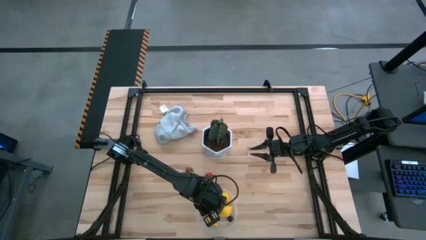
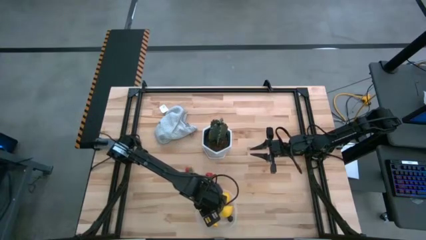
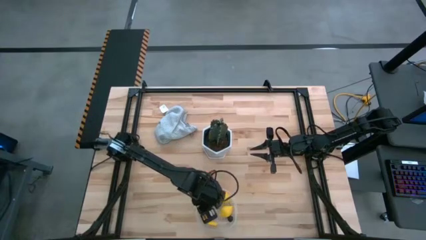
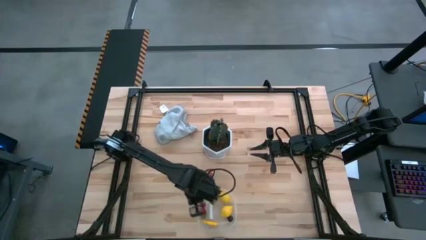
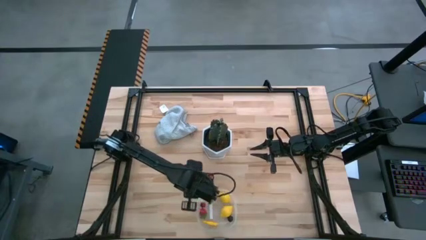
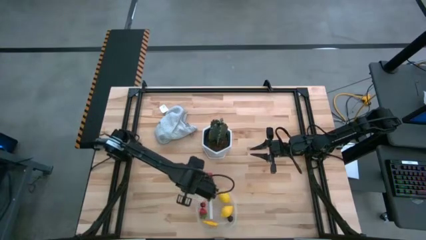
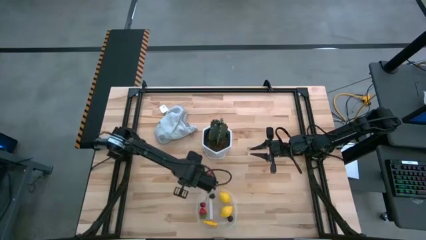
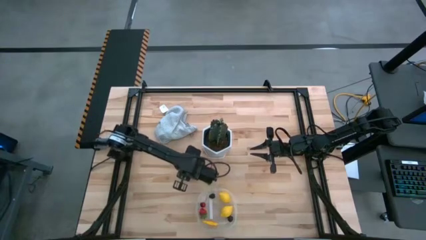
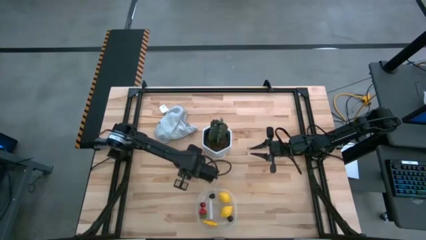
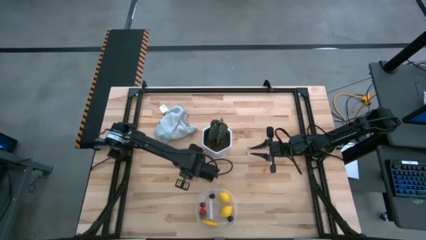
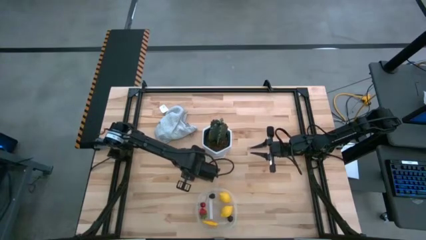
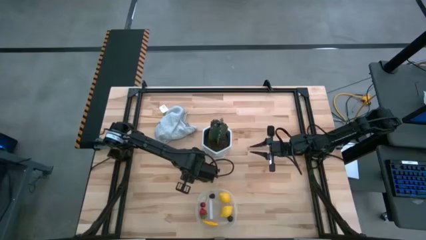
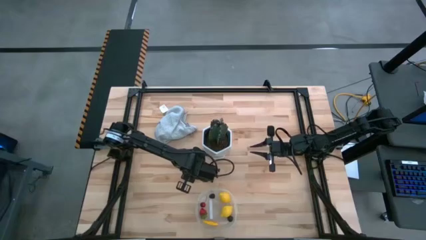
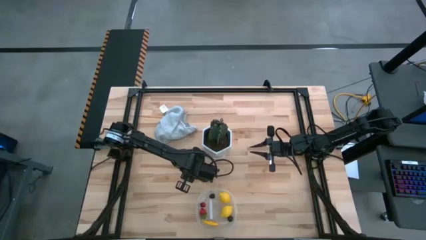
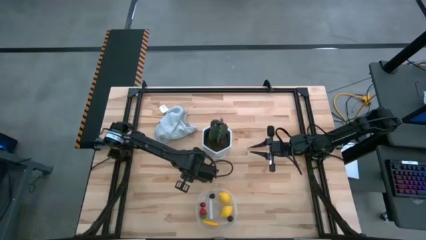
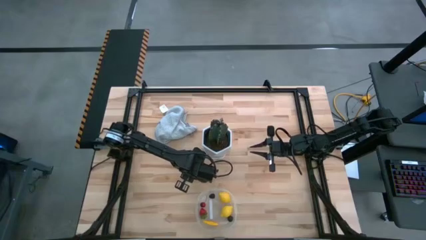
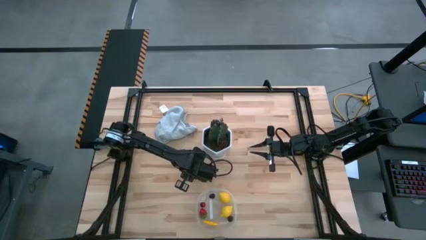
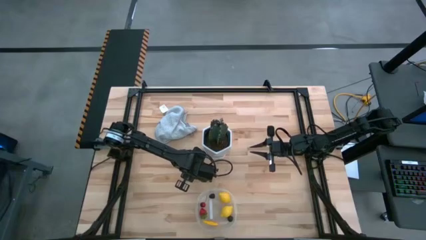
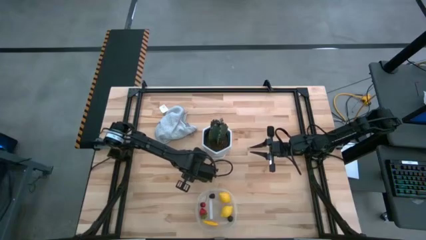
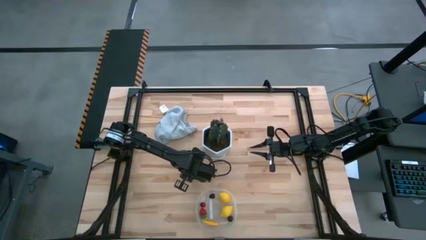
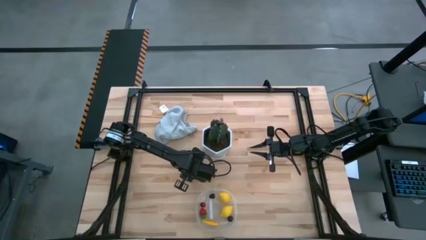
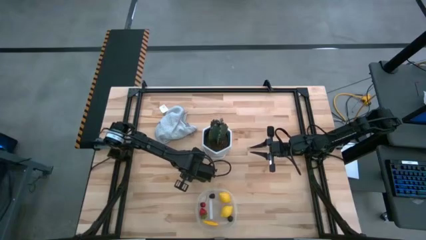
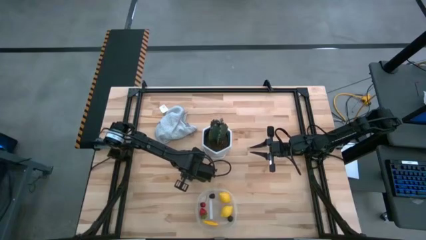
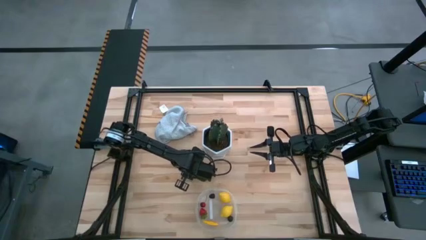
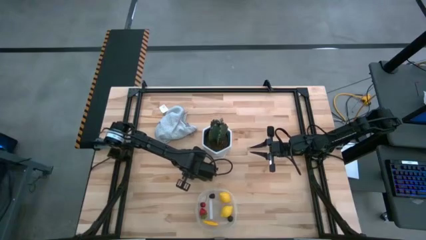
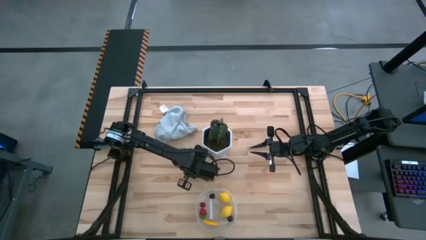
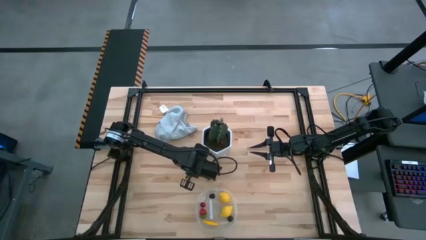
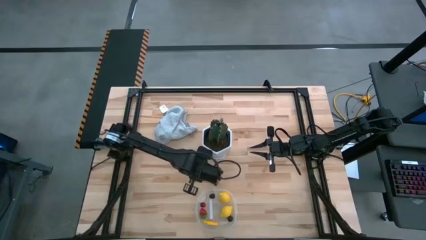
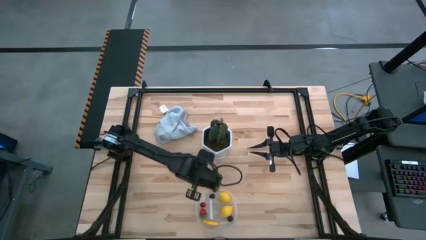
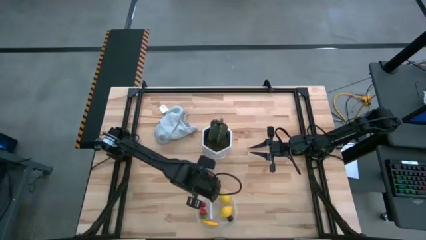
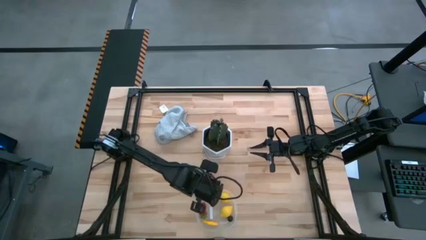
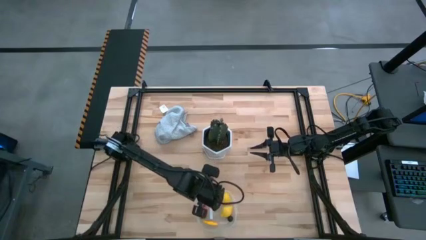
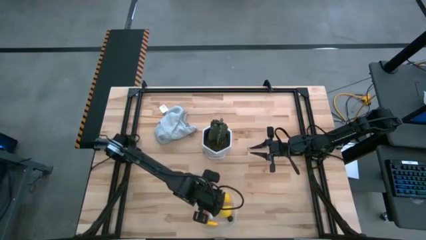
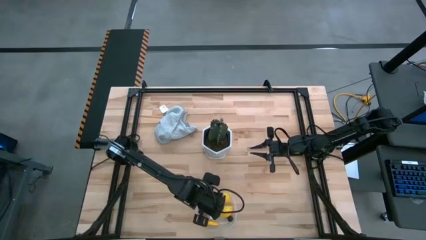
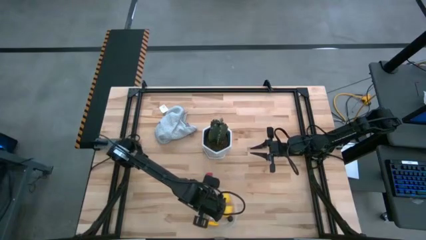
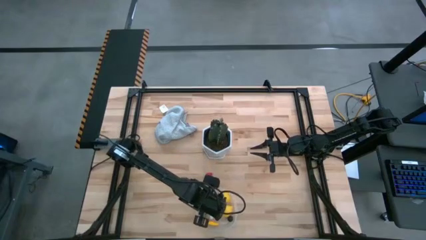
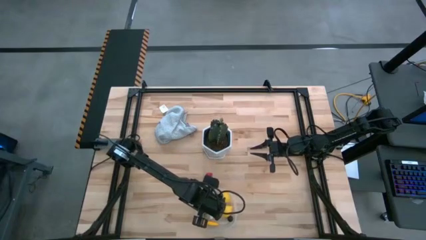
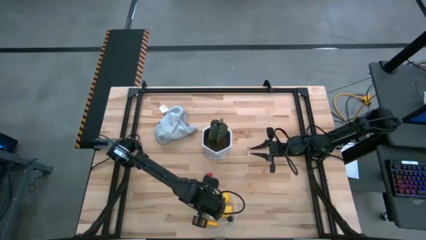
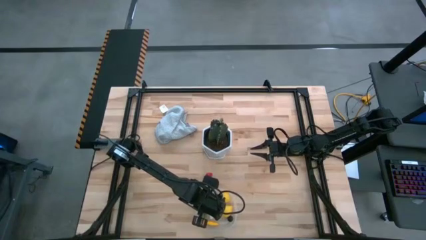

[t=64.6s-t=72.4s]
Task: Pick and placing Produce into tupperware
Put the left red strawberry into the transparent bin

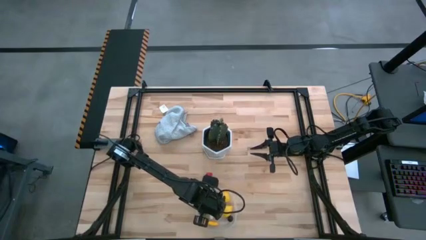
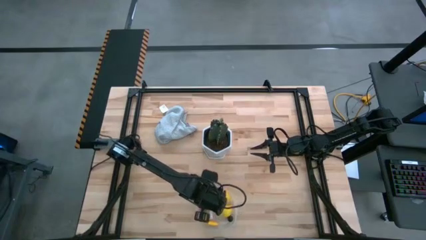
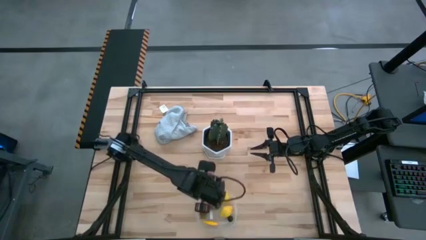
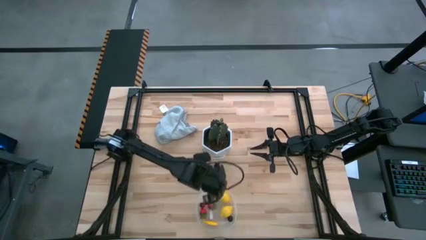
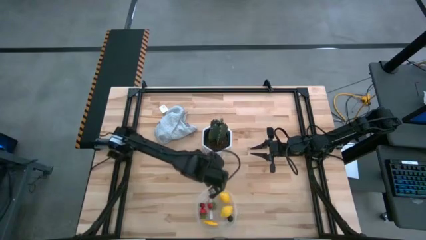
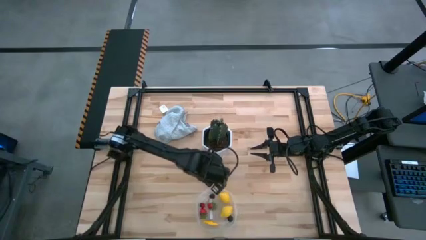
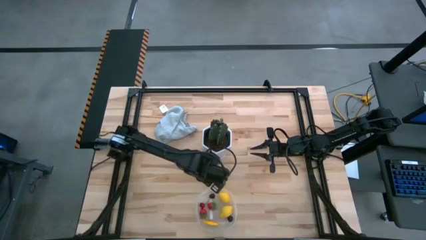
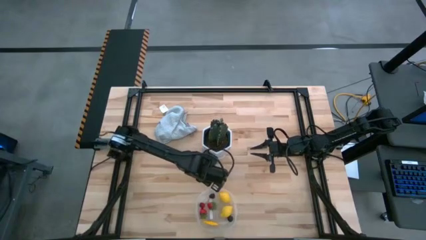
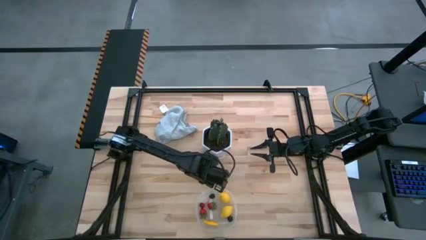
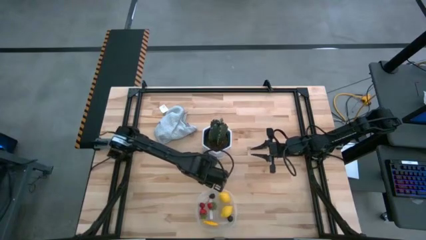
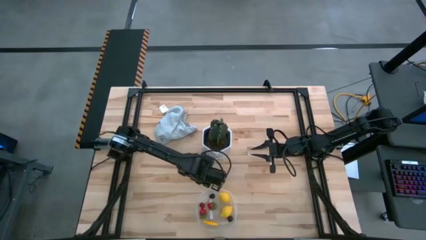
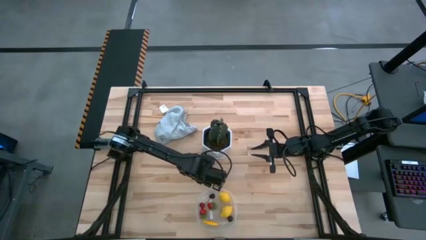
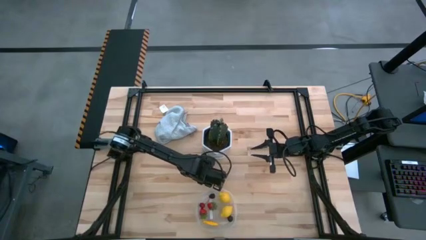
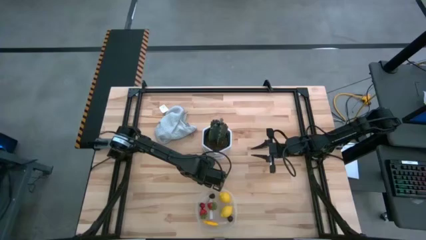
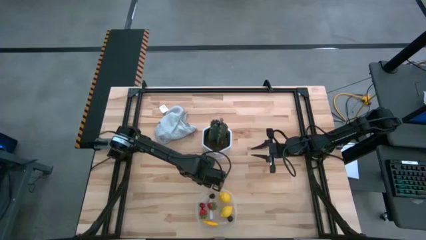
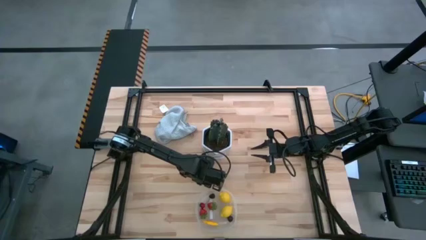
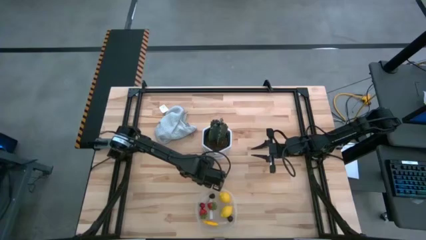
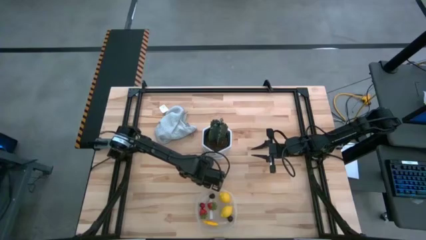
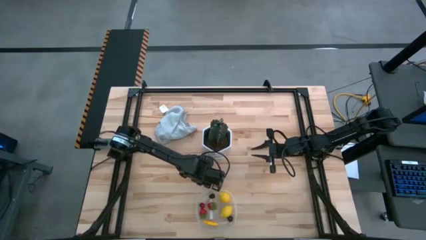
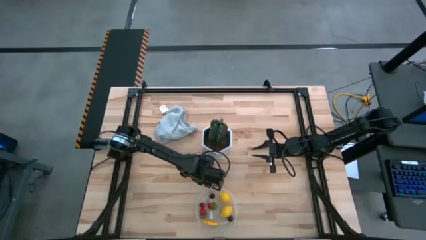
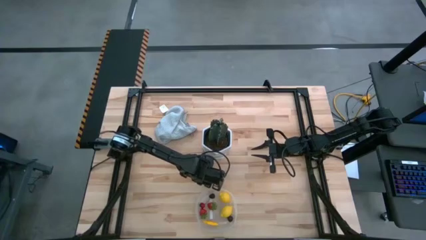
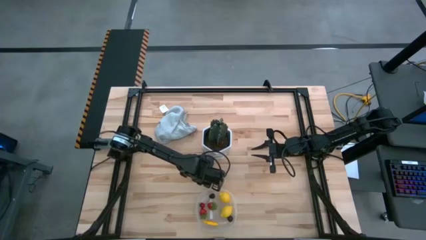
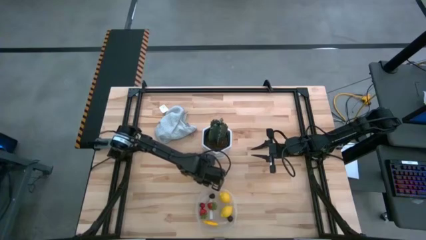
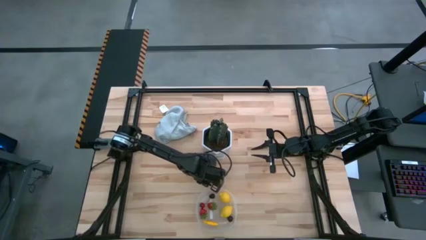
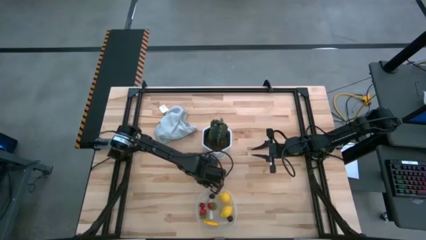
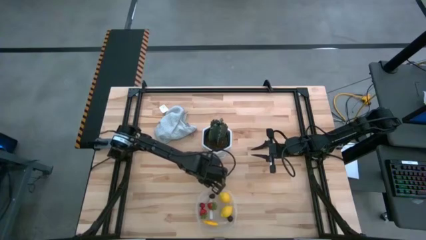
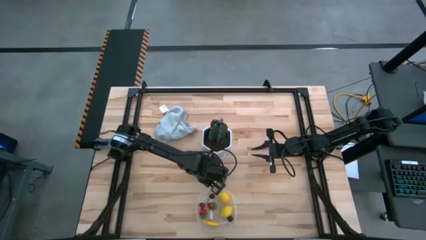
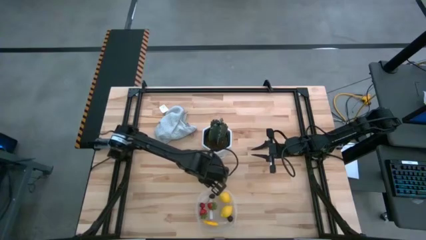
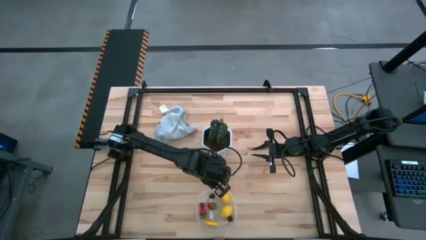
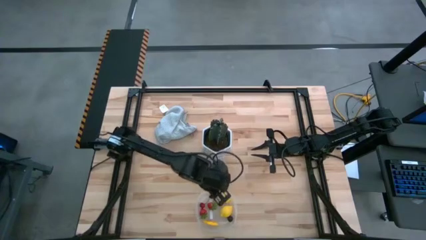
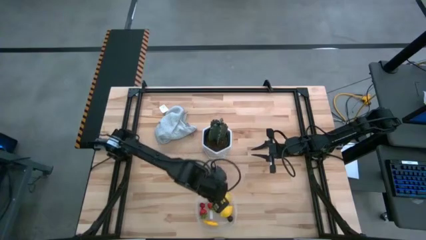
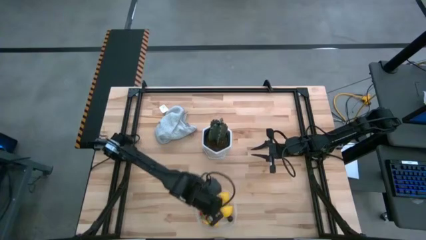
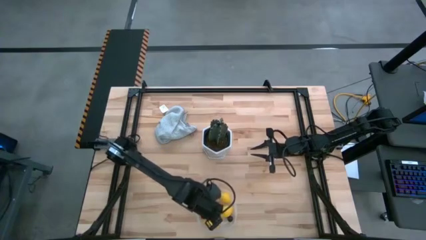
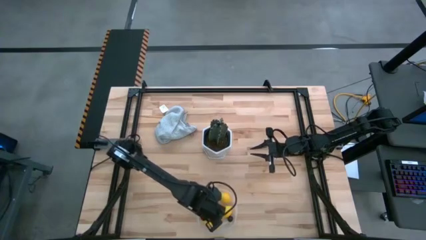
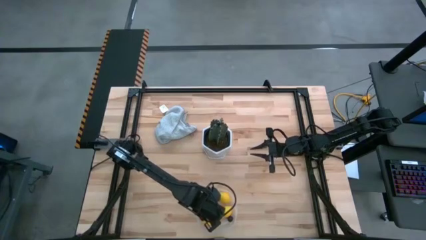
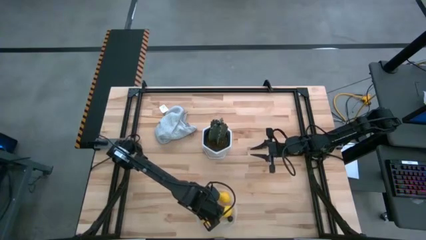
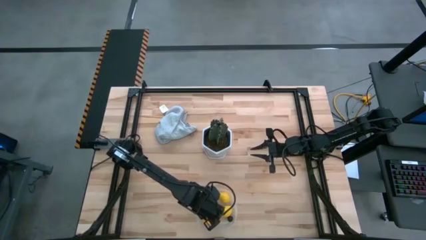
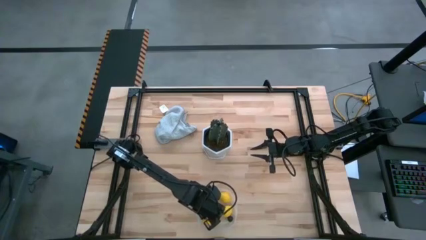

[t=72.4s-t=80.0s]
Put the red strawberry into the transparent bin
